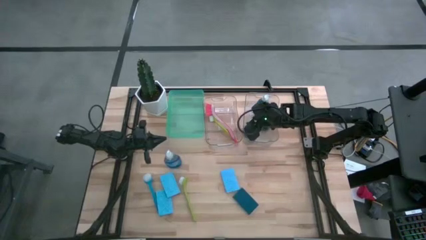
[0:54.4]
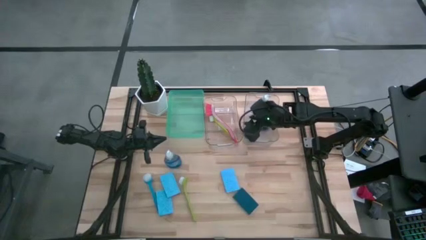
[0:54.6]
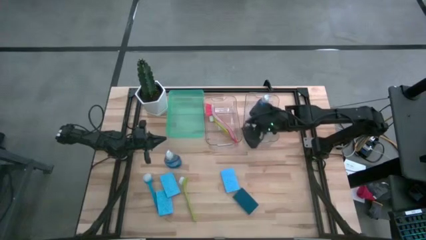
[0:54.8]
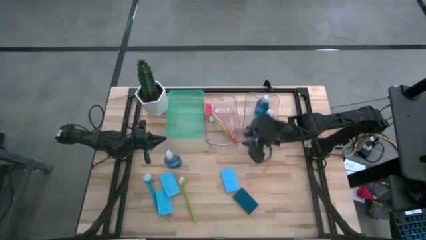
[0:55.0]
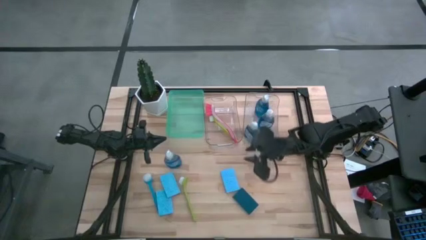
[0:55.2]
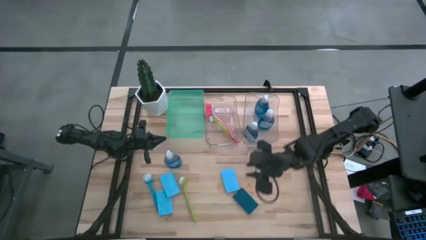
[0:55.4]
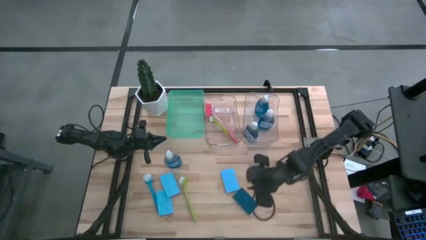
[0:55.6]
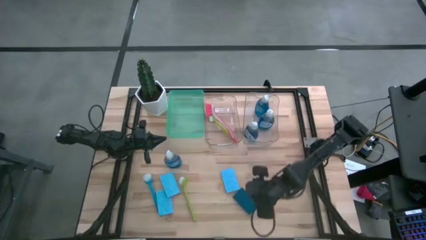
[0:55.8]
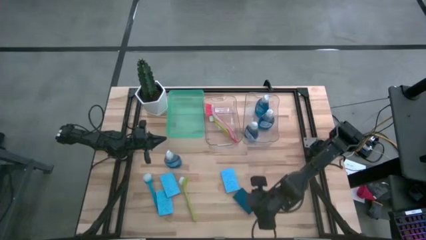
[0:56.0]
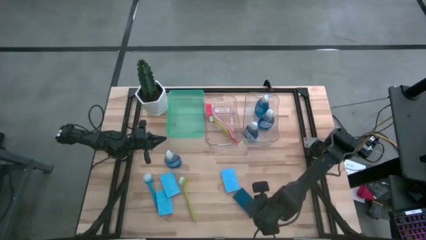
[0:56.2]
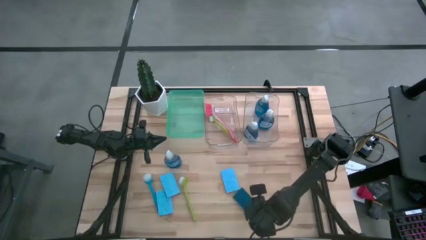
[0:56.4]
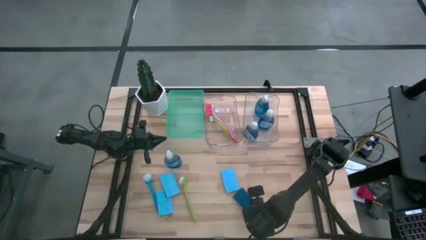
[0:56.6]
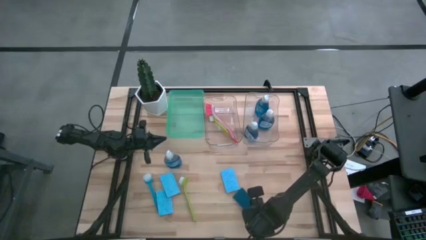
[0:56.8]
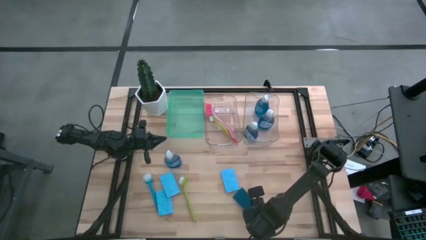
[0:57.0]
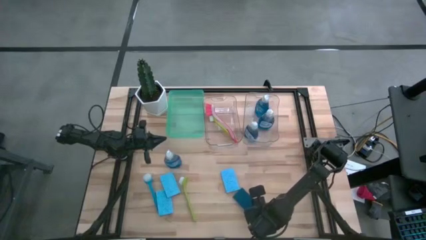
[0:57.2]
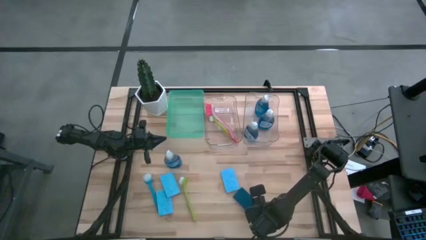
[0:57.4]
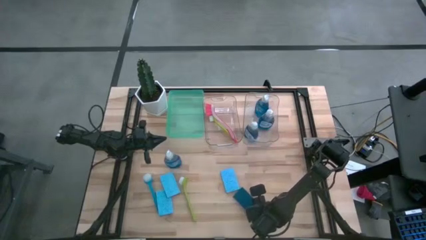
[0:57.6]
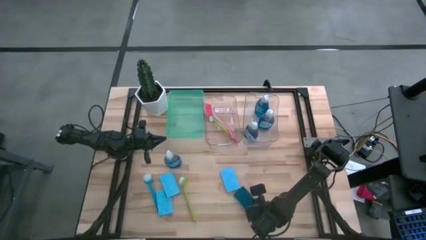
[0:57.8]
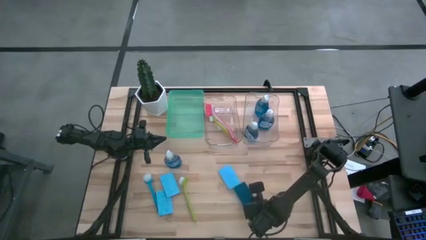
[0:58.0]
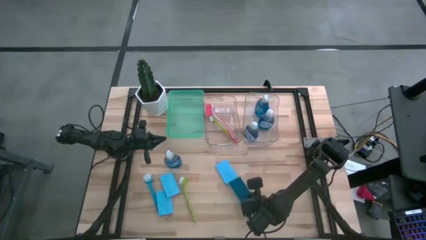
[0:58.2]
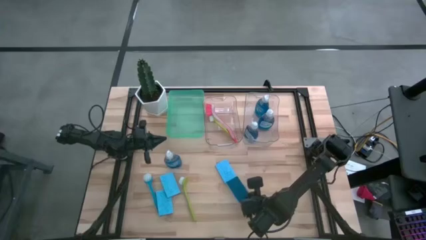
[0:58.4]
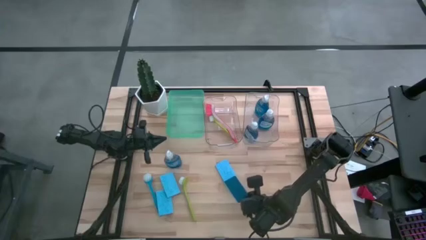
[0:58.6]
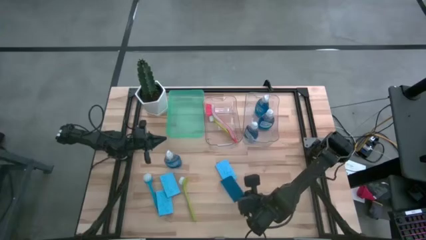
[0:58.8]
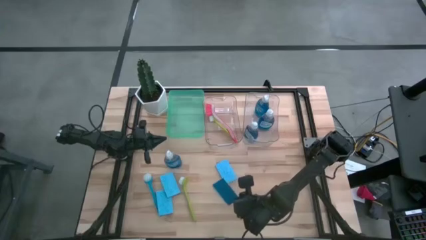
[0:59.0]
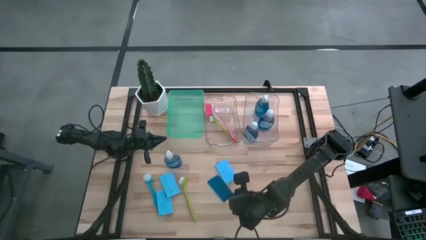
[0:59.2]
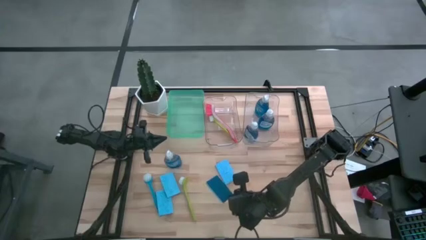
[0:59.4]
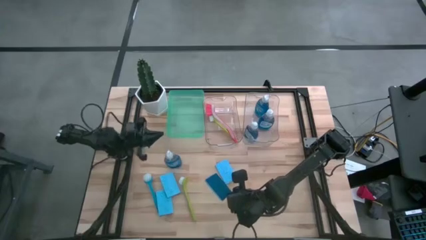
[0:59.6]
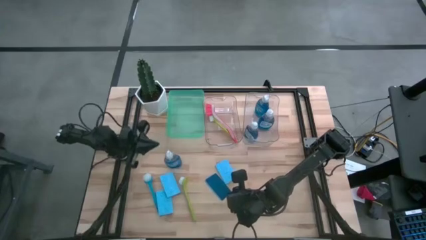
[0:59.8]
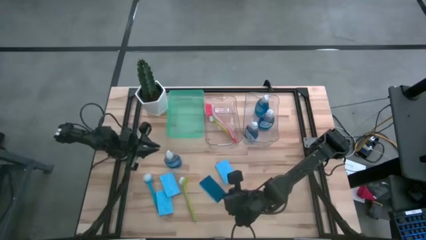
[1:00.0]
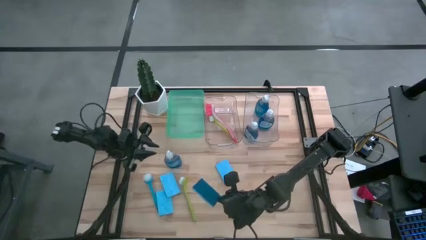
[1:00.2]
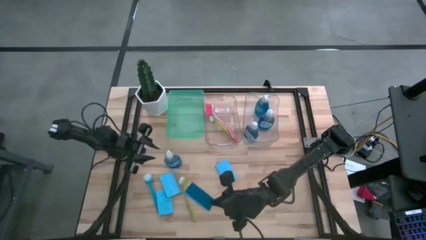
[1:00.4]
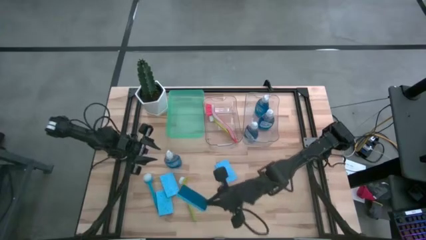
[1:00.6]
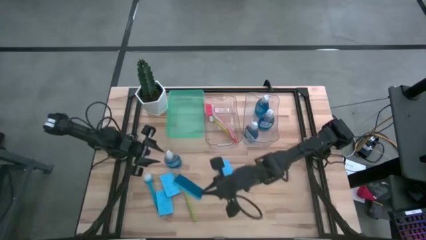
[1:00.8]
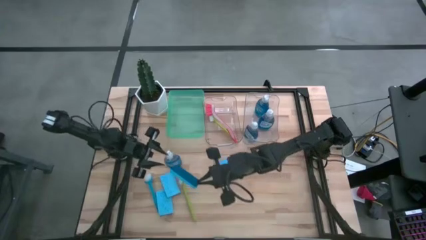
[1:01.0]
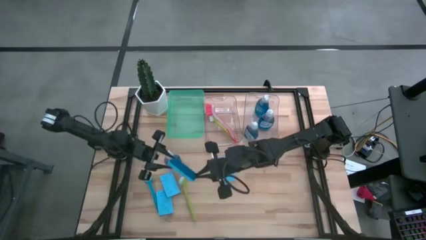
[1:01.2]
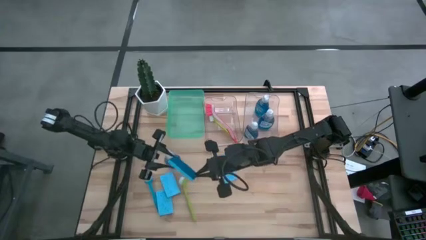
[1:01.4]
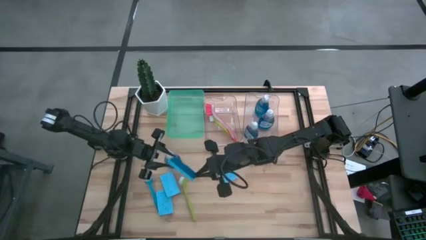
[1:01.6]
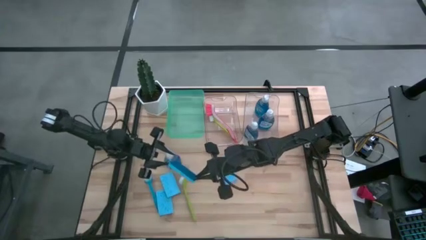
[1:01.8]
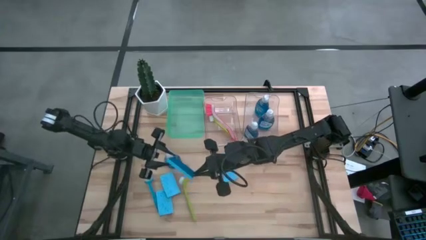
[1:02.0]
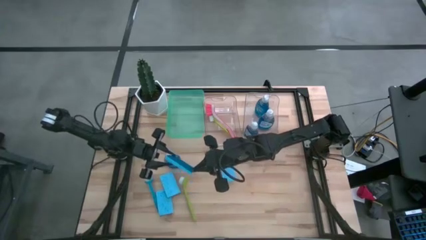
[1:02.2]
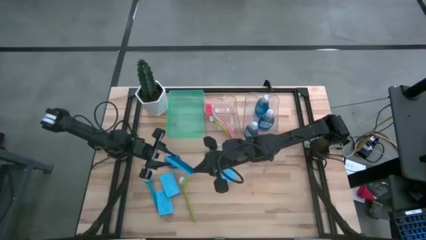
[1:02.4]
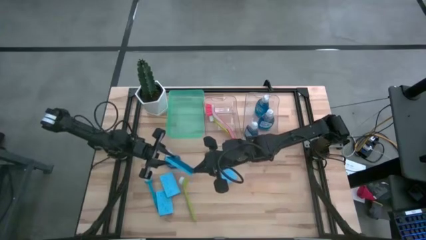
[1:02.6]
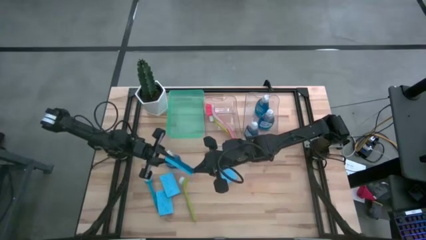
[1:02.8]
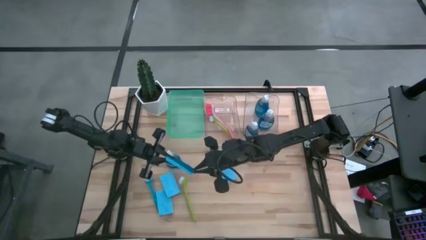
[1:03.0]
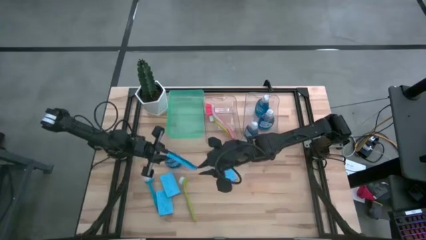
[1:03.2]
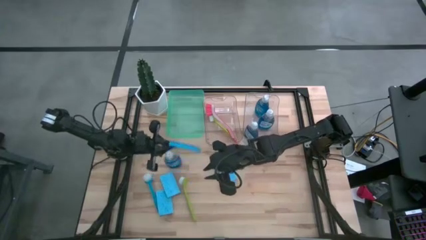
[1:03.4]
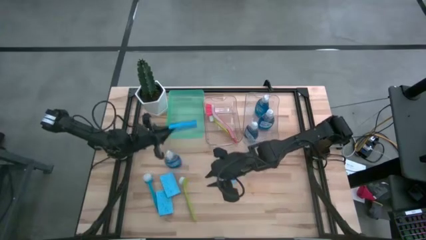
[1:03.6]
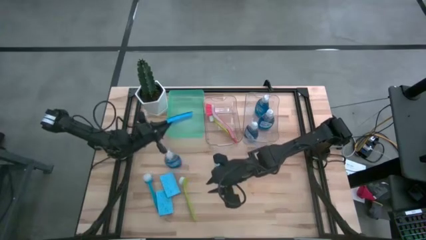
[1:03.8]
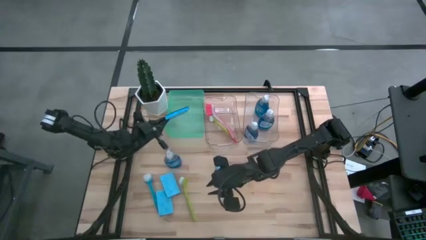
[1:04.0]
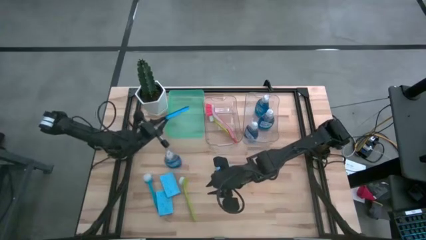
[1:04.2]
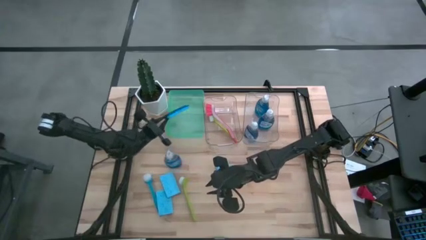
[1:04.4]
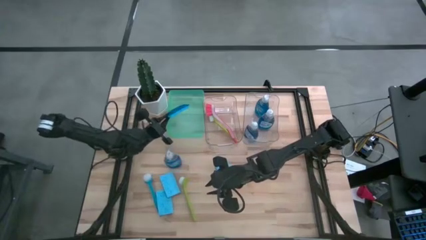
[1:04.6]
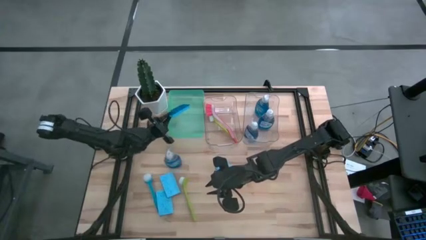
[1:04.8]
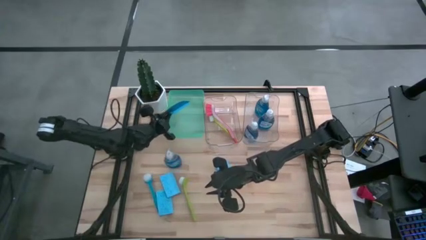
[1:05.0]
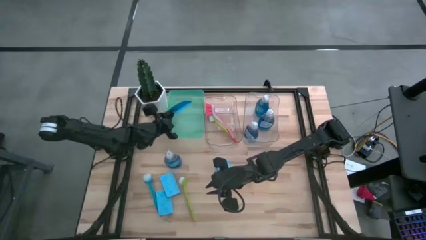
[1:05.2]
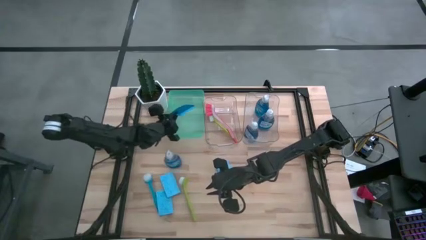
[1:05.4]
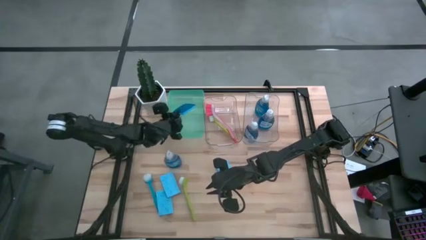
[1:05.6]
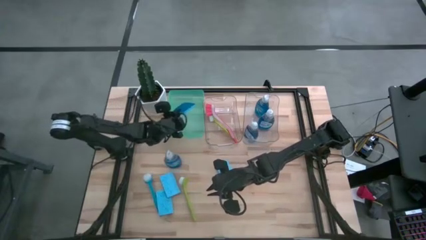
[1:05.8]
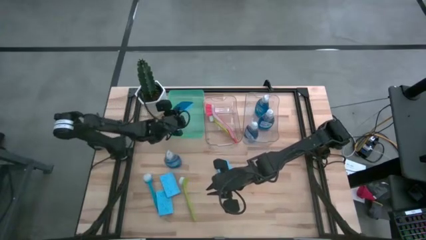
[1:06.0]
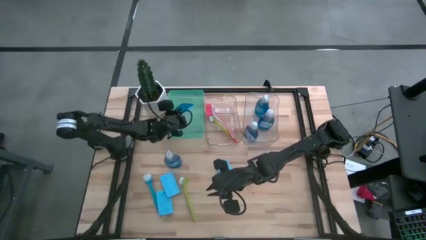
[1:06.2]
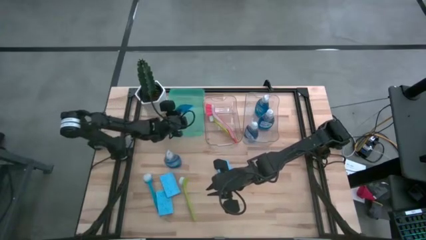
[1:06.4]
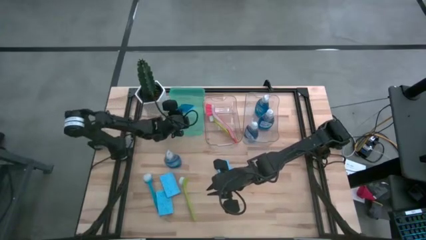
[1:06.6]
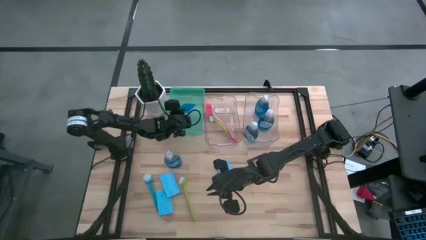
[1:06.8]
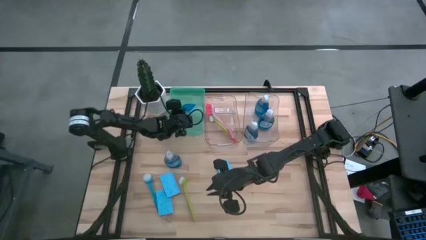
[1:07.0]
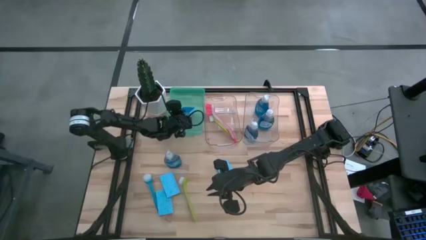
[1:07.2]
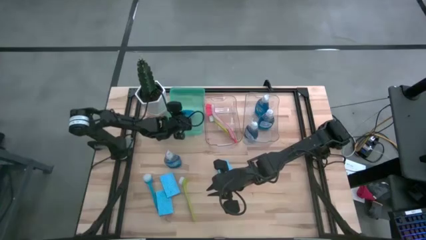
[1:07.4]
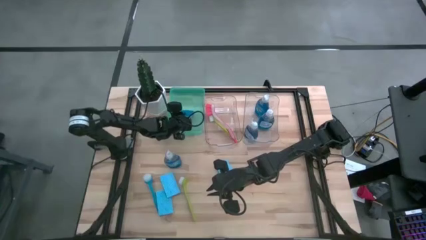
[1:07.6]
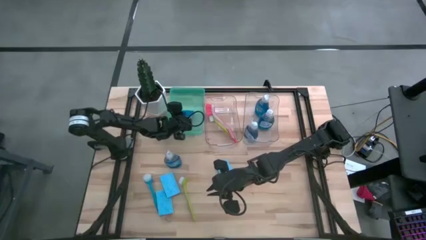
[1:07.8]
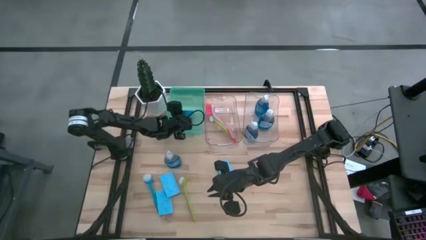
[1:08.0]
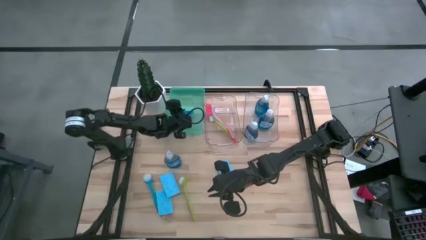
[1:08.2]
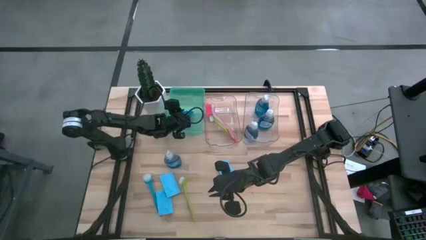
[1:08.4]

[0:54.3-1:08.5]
Task: Pick & Place Kitchen Sink Supplies
Put the blue sponge into the green bin

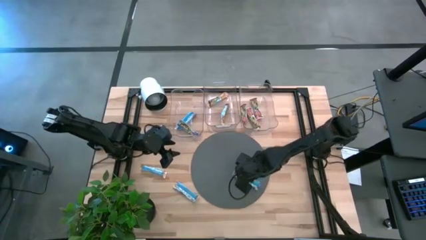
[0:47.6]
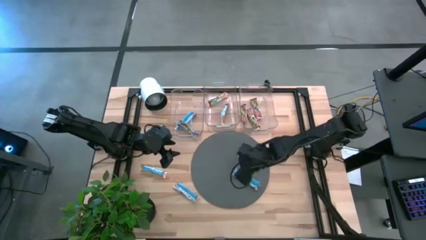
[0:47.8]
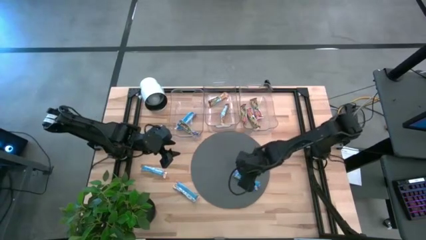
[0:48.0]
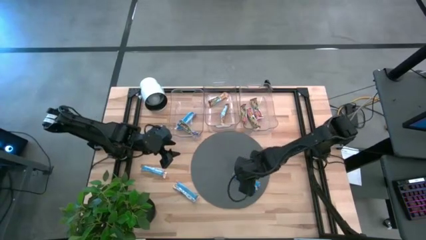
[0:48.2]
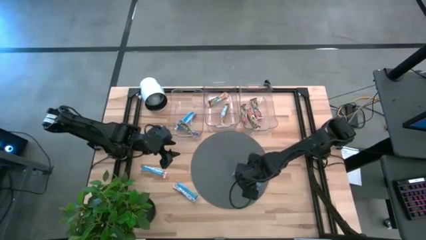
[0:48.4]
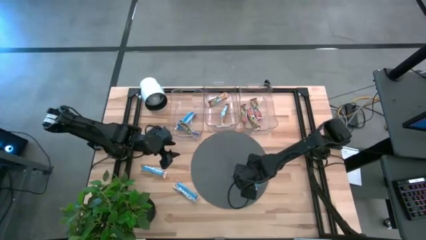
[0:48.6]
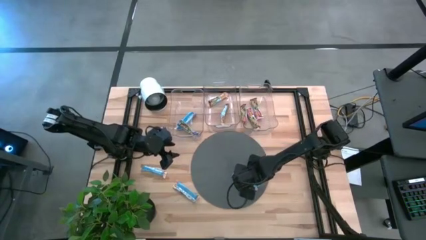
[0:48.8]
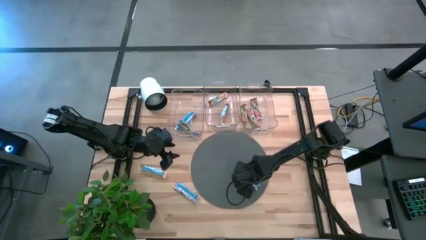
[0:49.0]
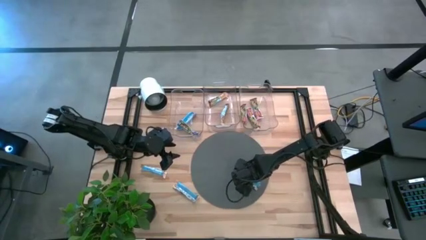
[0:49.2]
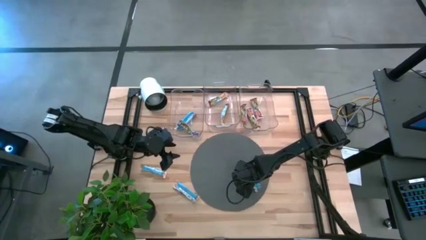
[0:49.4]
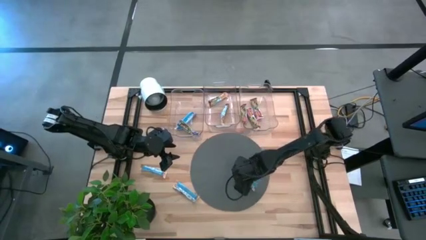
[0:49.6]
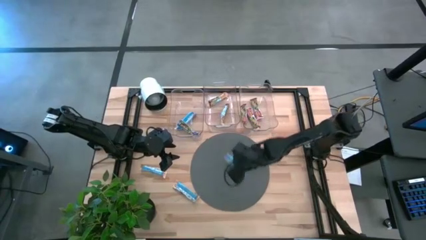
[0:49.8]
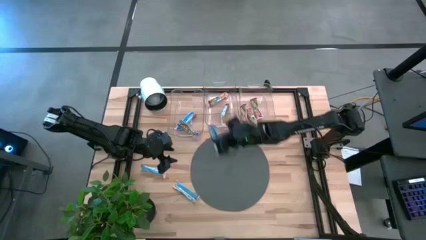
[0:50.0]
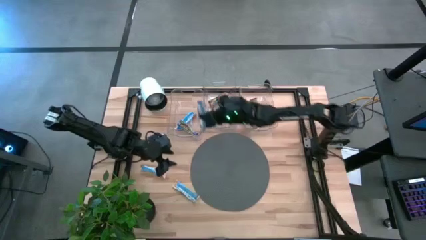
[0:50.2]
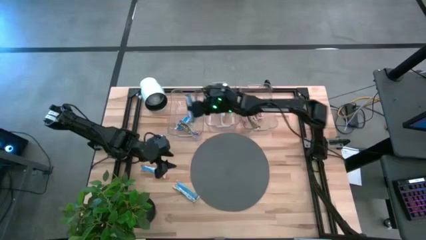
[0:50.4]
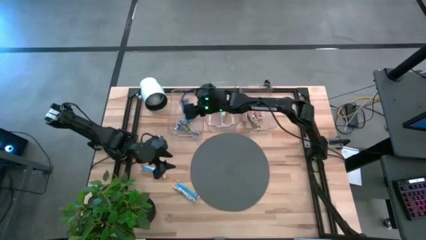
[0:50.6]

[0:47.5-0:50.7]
Task: Pick and place Granola Bars by type
Put the blue granola bar into the left bin
